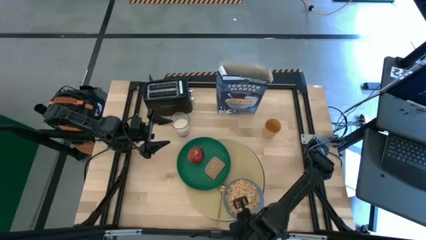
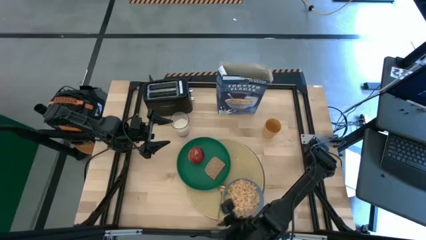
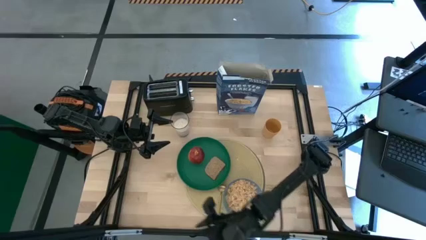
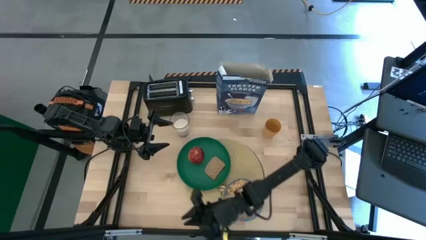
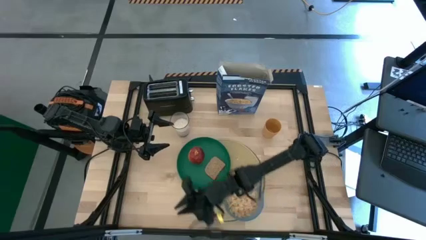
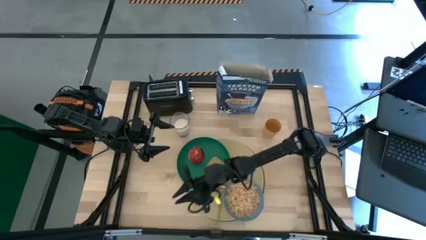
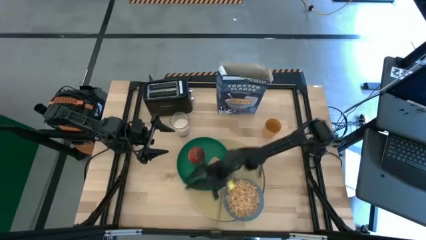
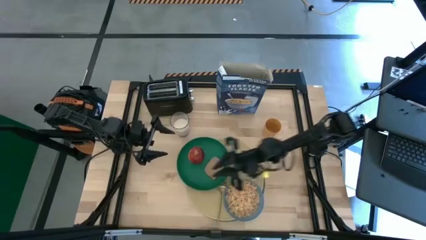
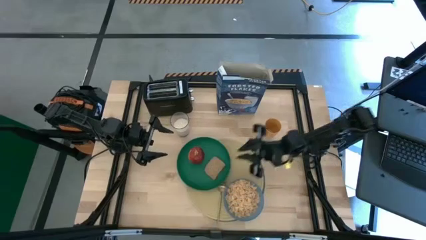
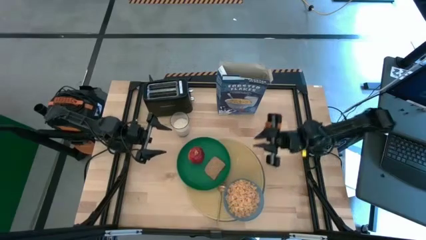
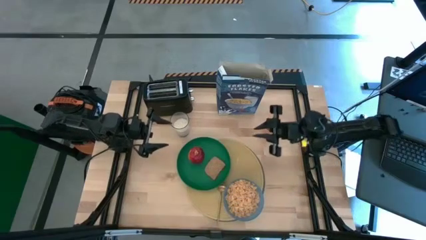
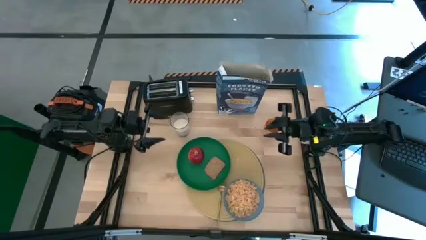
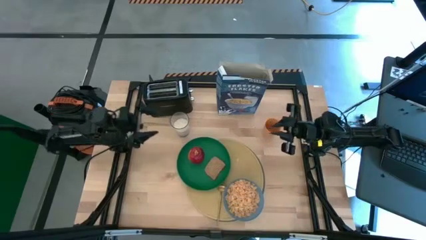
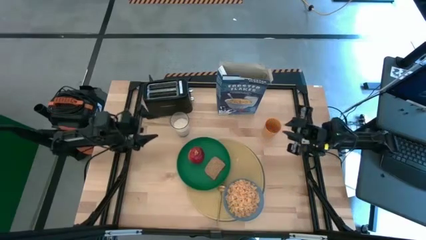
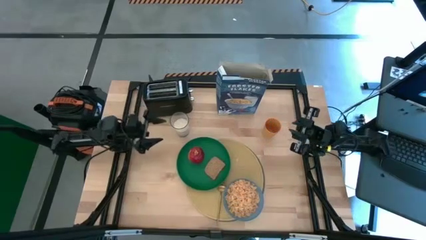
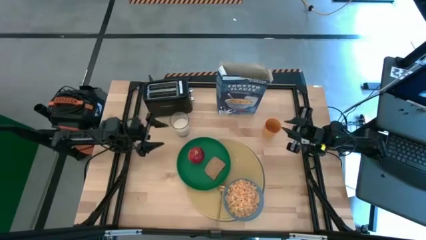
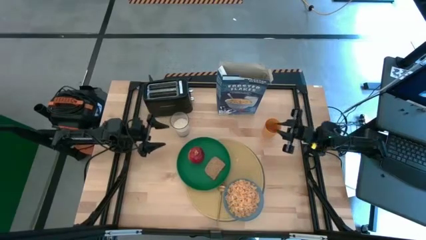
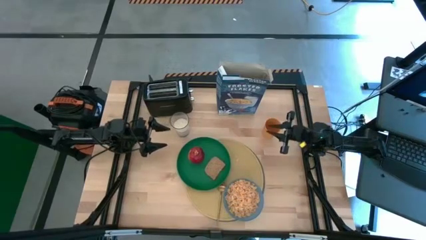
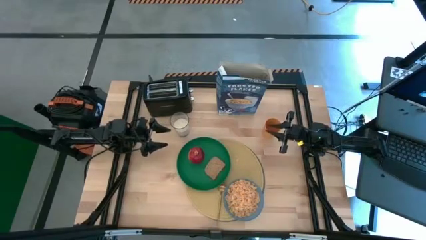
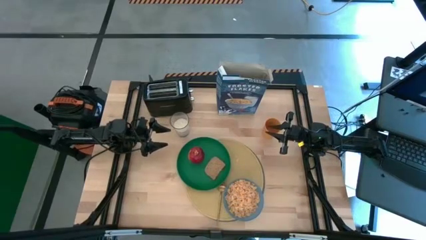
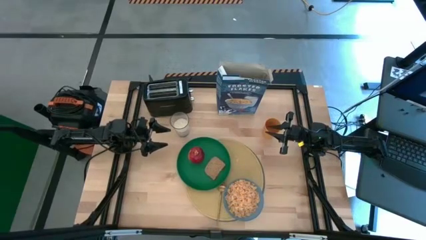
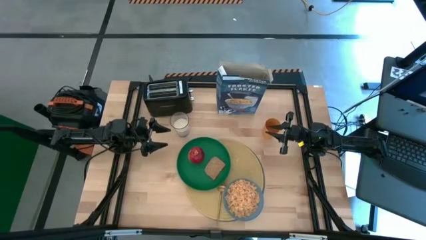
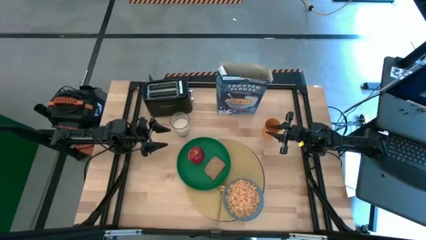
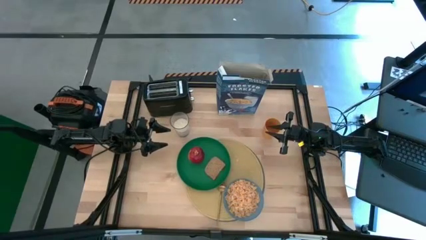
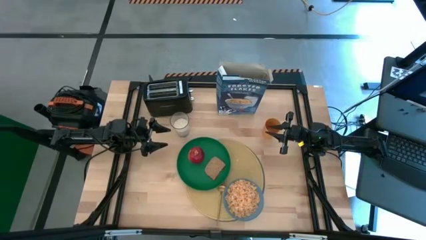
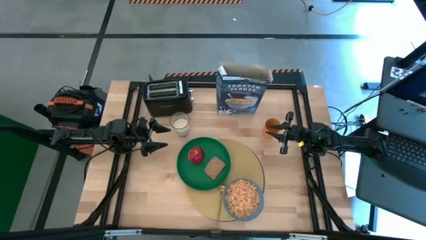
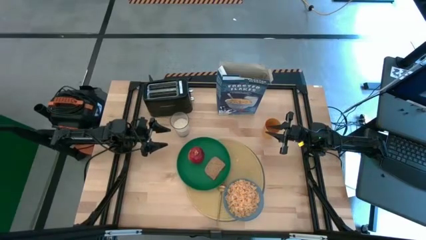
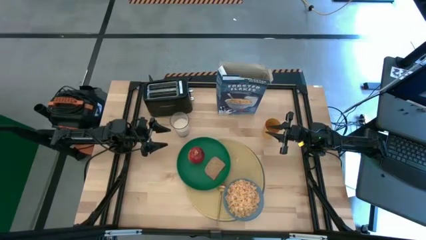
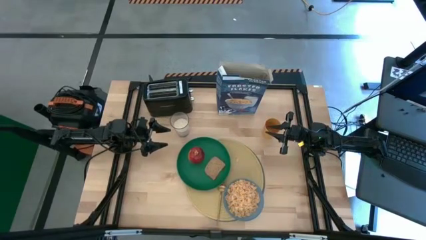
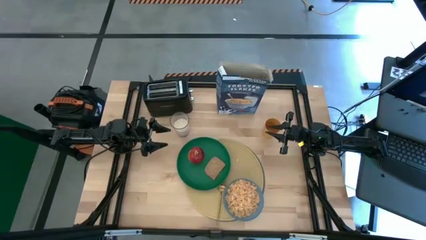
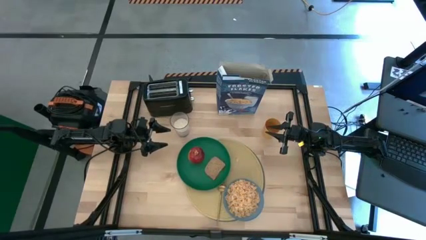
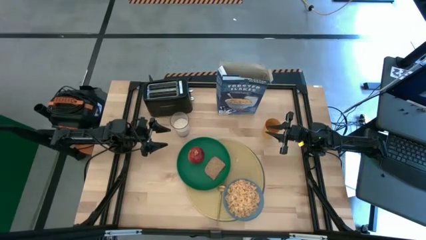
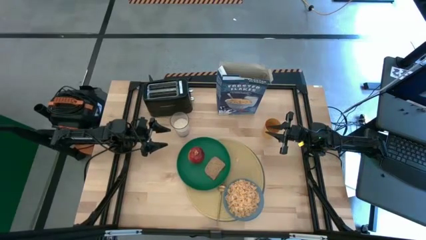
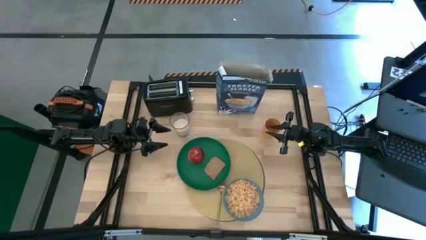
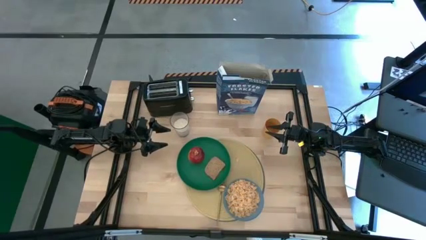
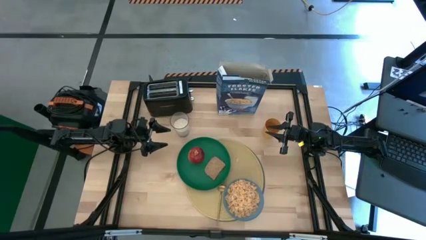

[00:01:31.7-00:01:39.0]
Task: Arrange a breakfast setting
Return to Home Position

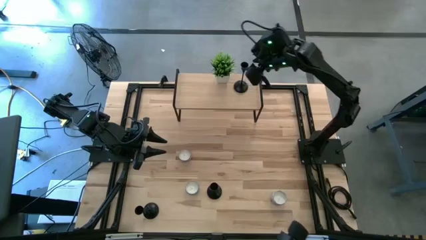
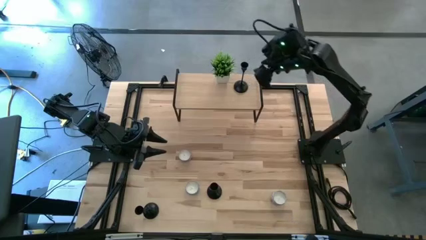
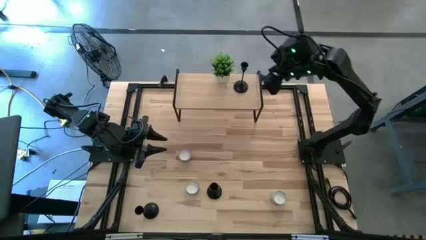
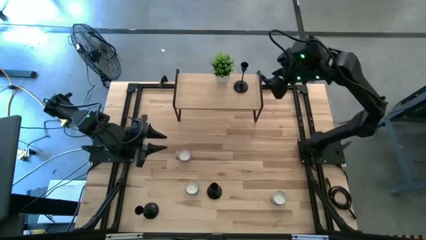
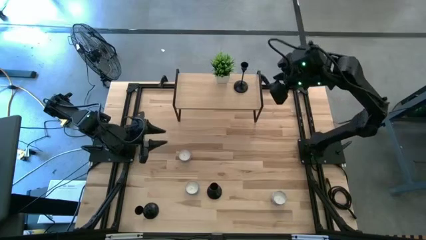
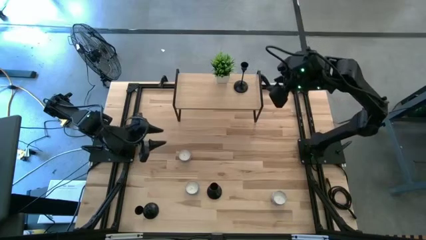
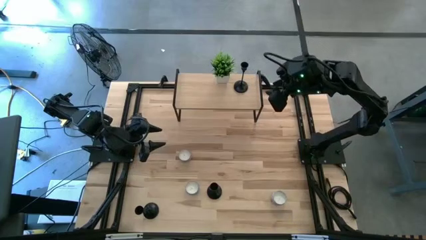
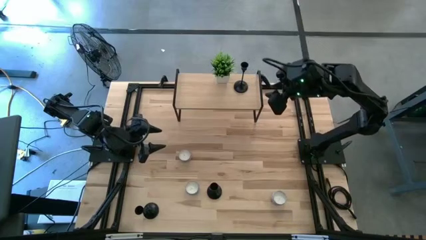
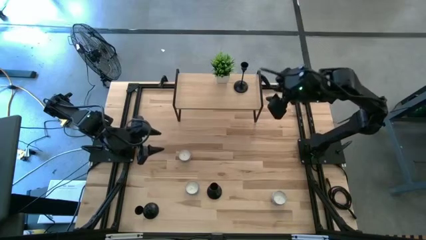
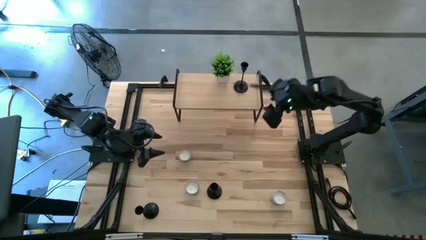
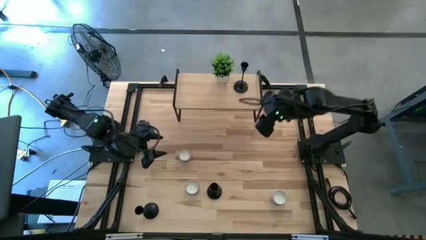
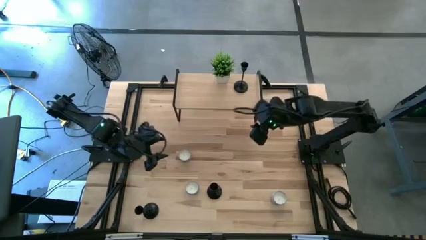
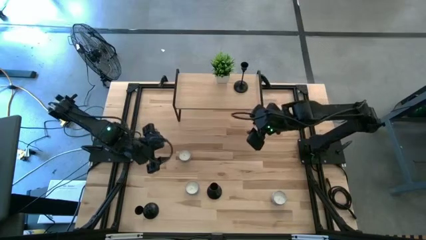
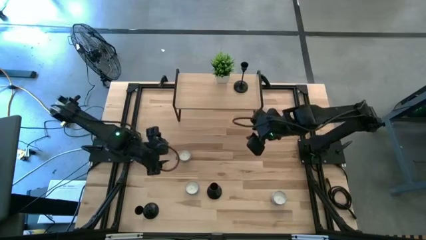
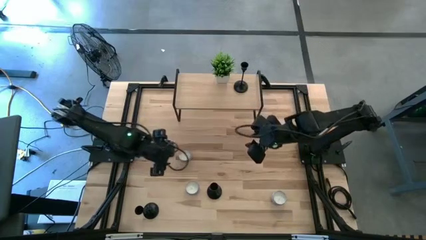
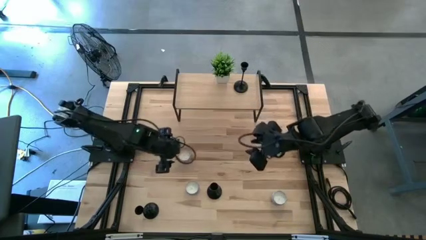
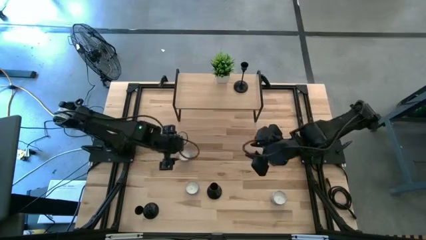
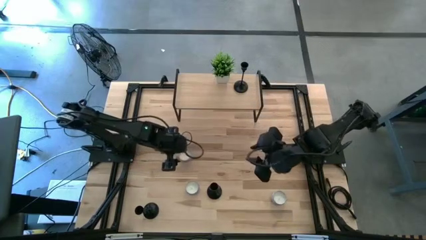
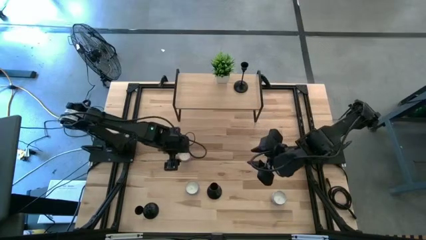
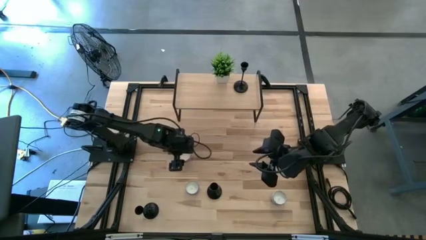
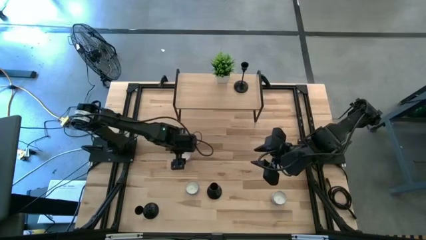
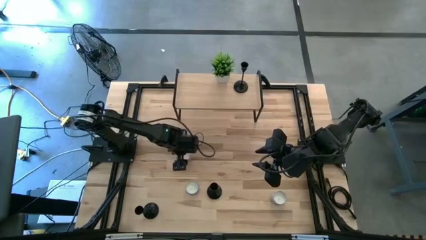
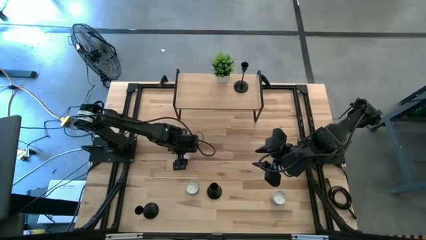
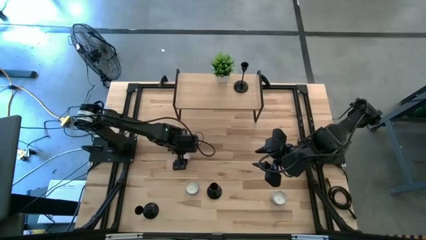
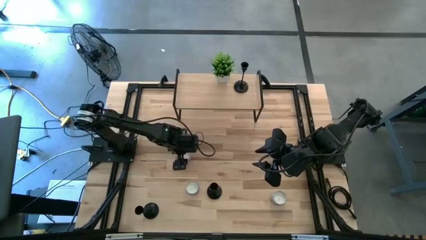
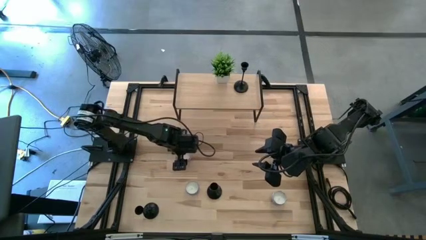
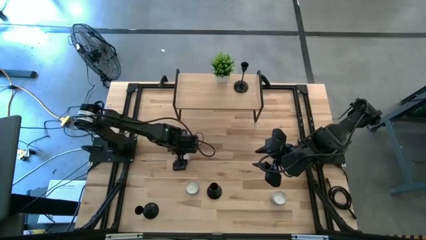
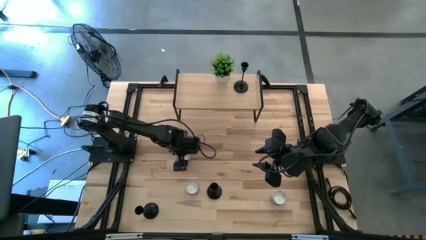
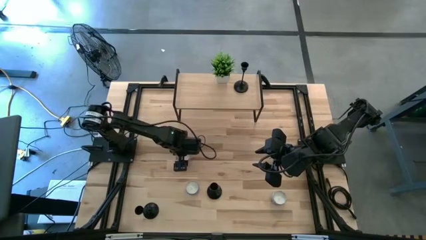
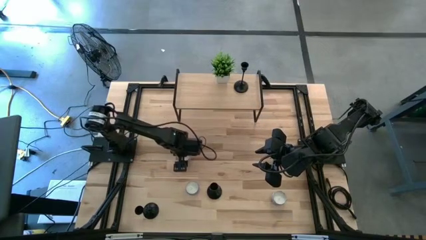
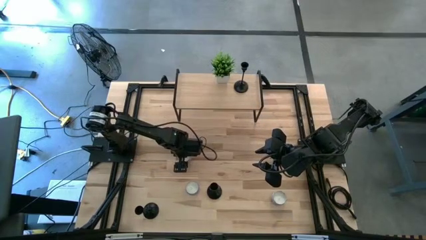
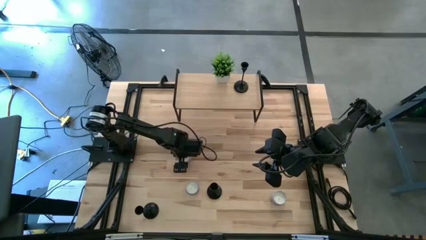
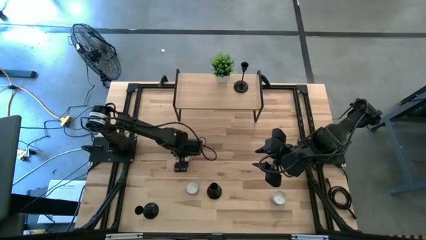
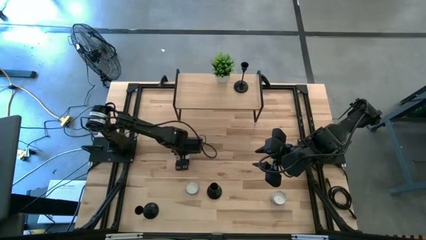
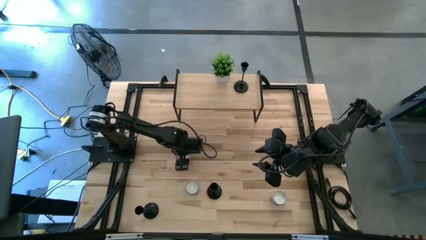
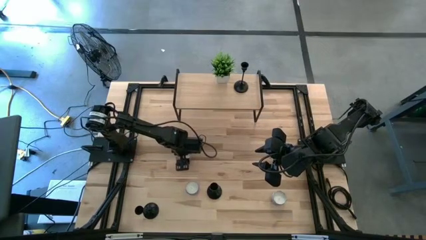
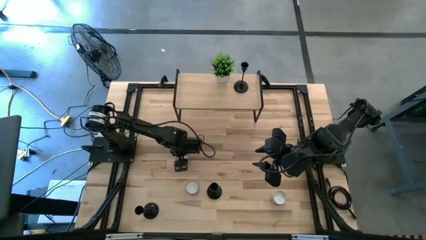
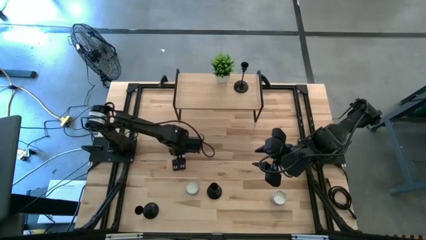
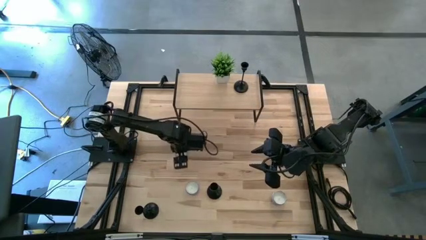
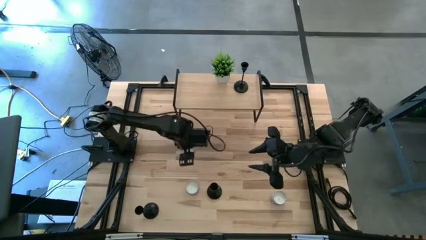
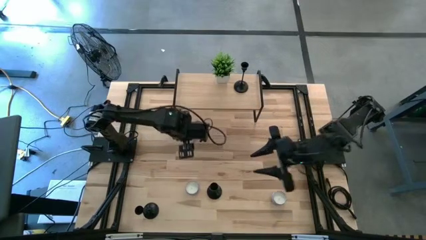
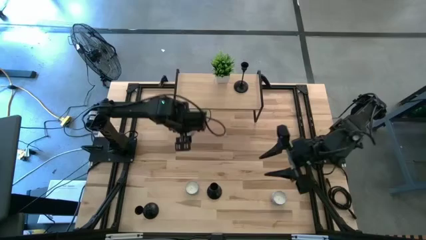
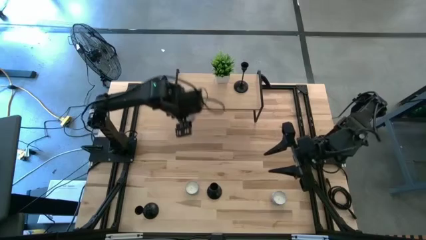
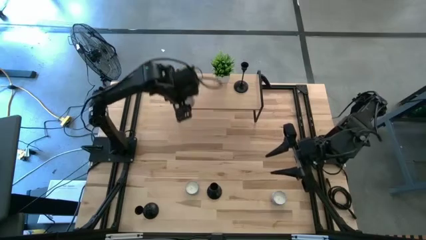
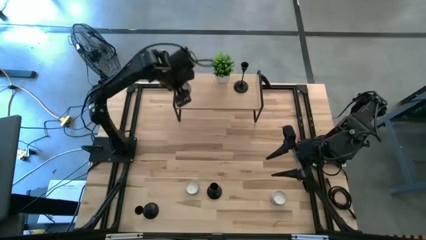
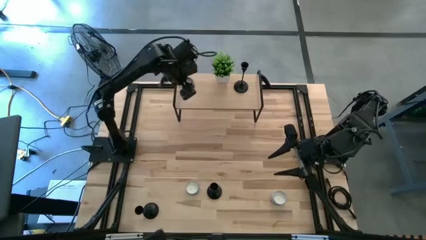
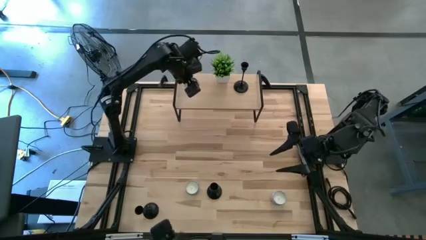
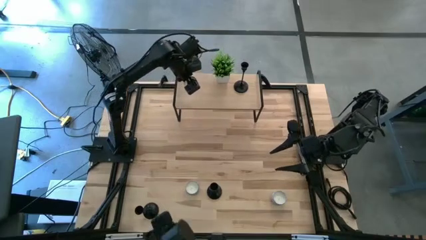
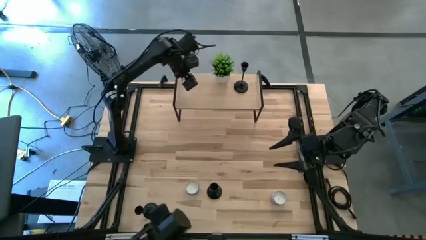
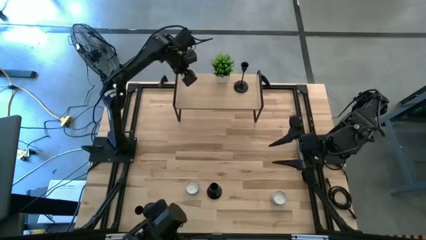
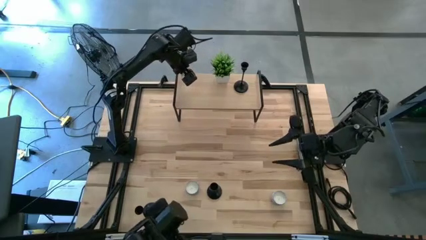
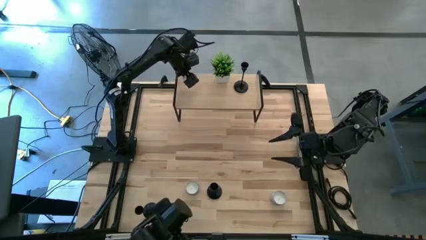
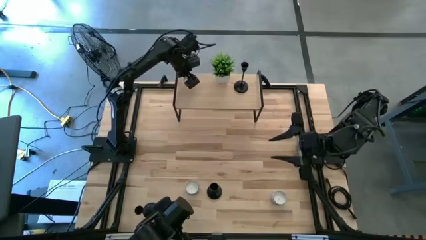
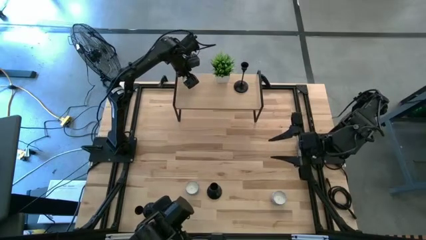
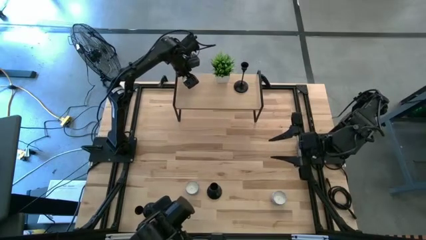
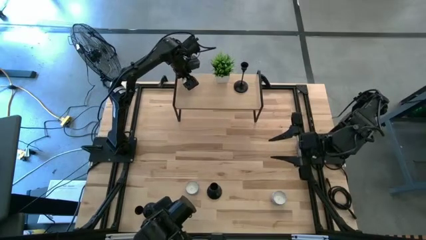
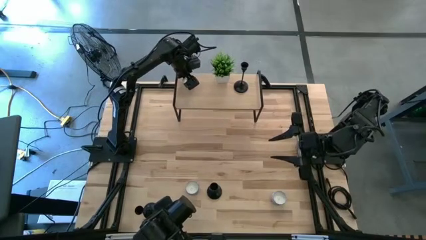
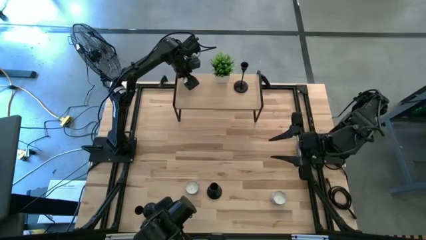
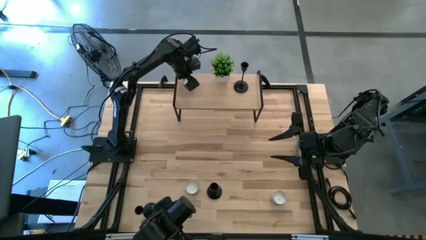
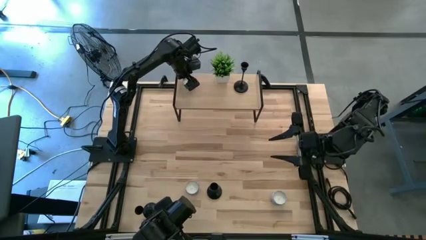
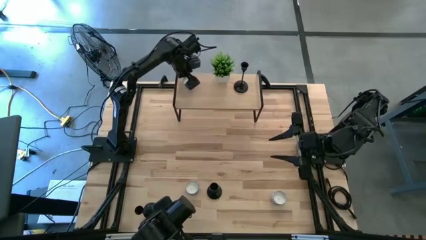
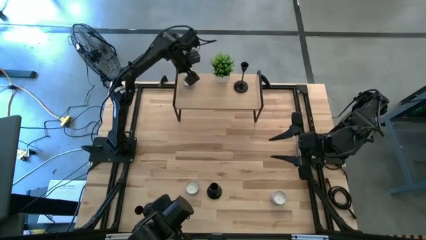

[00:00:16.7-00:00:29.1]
Task: Pick & Place candle stick holders
Put the red candle on the shelf
